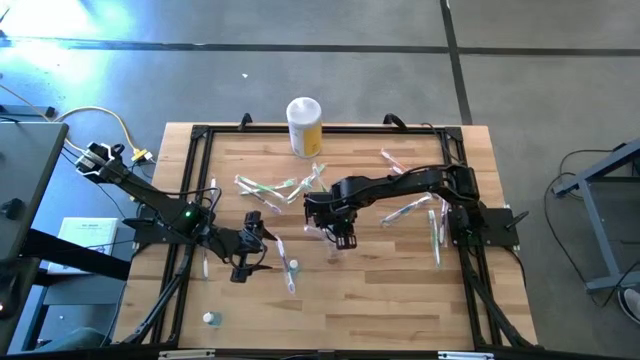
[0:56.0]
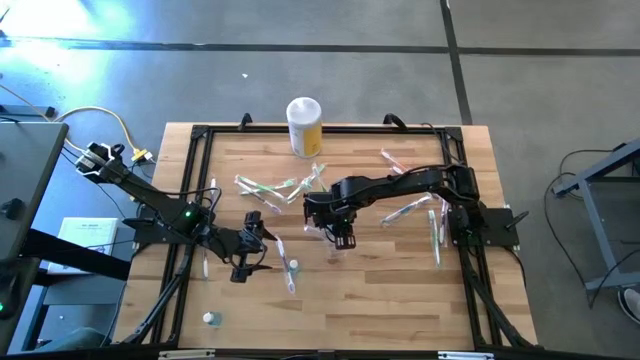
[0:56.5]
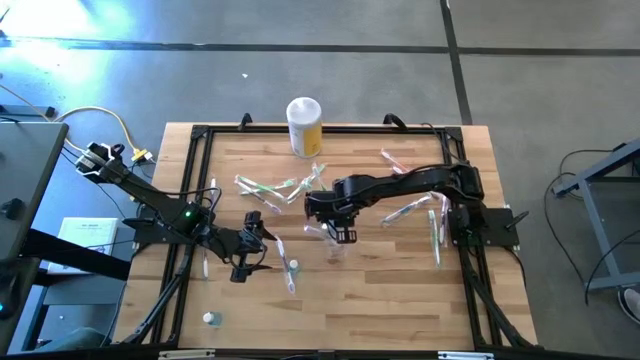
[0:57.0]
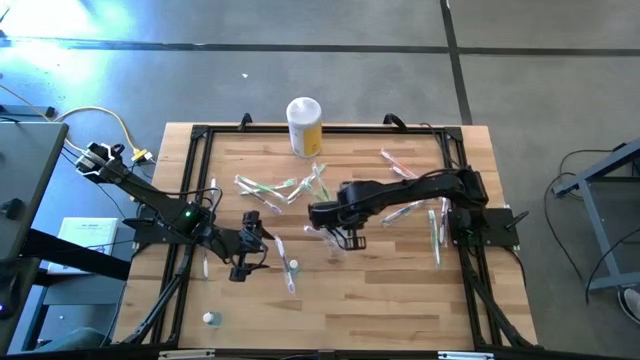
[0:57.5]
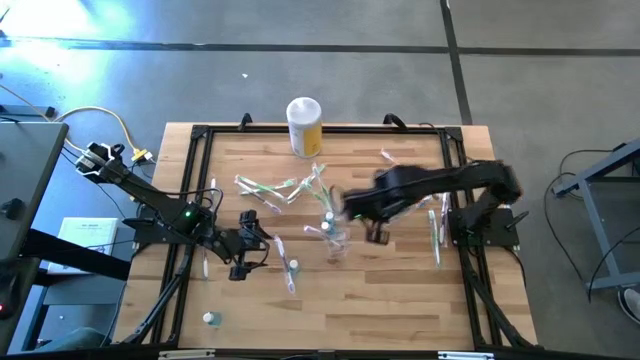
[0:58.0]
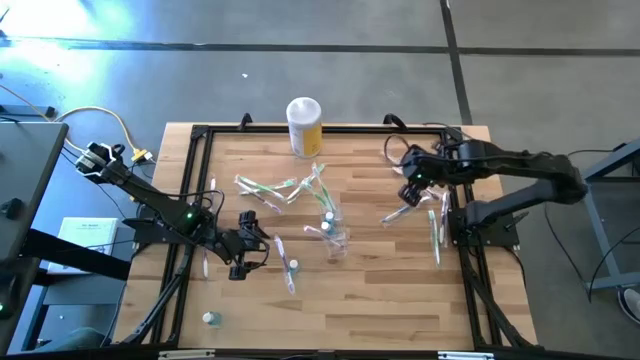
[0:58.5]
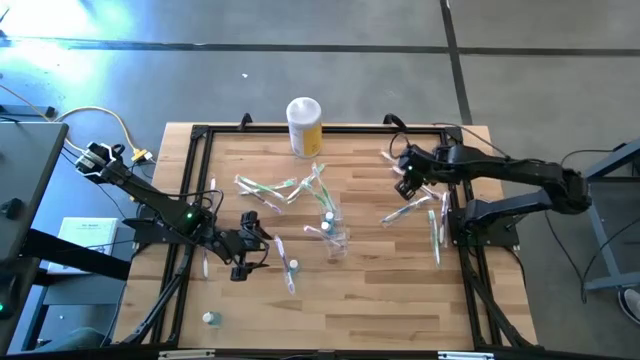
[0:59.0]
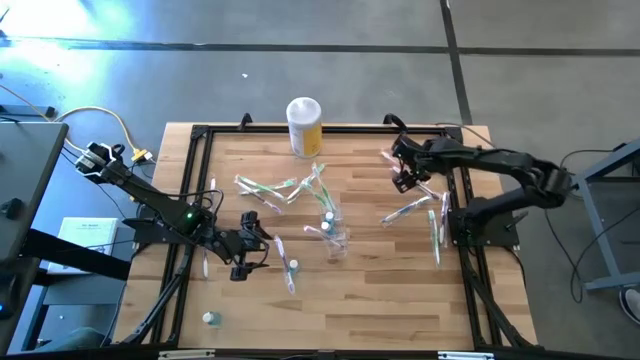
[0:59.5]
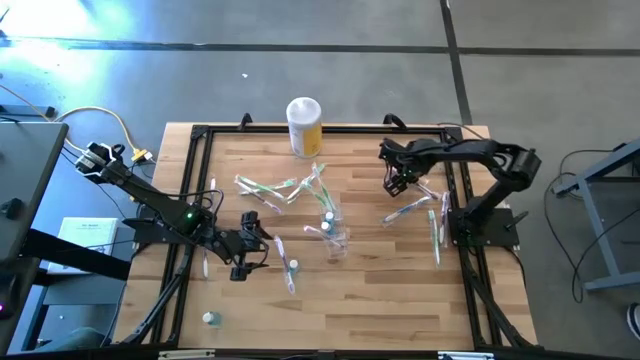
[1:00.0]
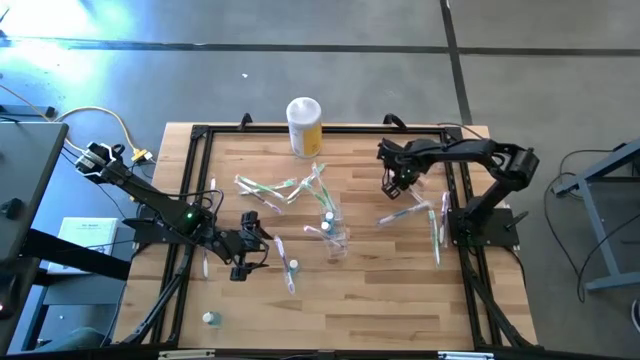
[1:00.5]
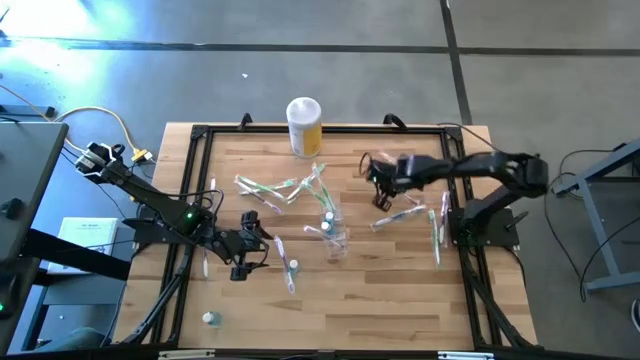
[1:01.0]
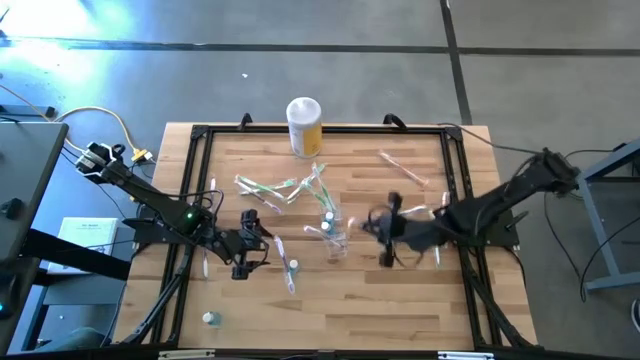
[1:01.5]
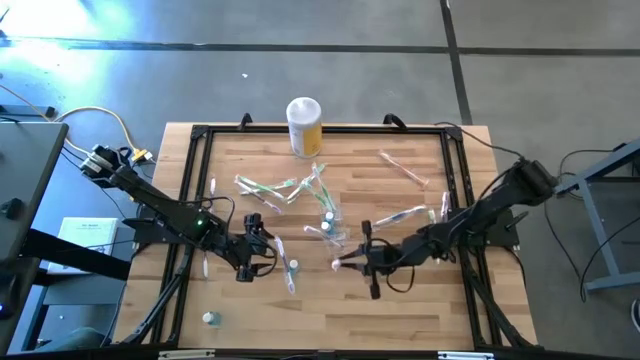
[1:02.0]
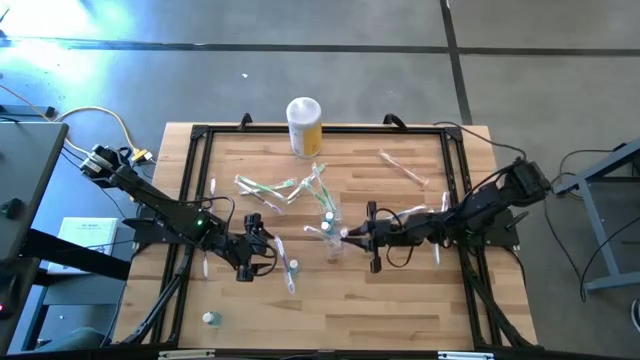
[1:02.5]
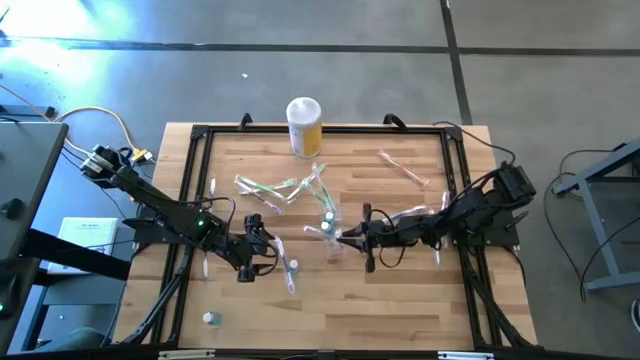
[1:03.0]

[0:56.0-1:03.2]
Task: Pick & Place toothbrushing station
Put the purple toothbrush into the transparent organizer

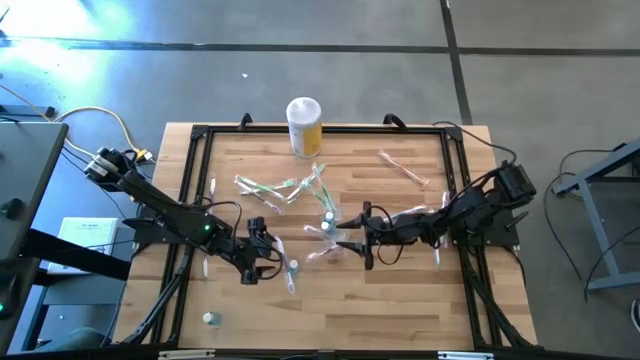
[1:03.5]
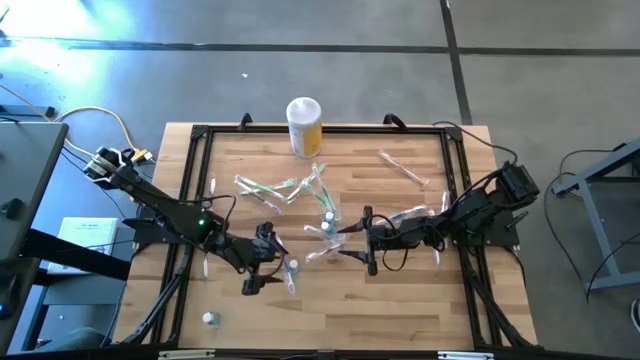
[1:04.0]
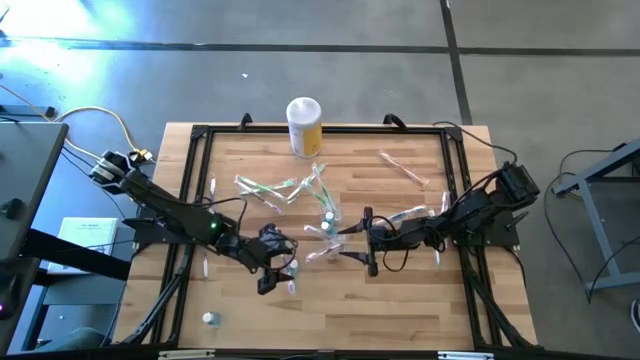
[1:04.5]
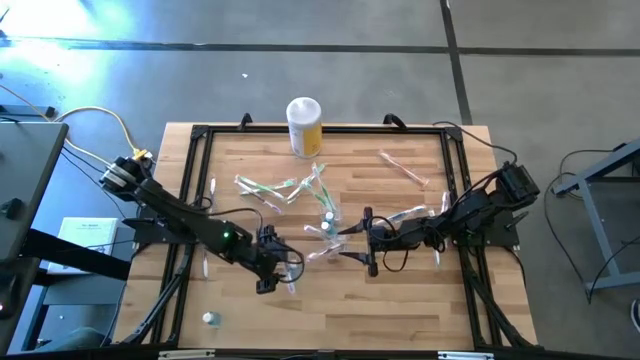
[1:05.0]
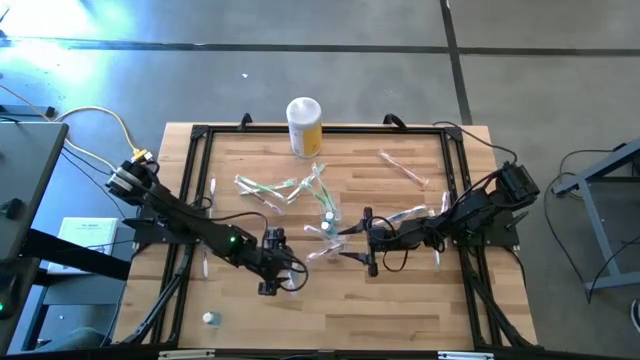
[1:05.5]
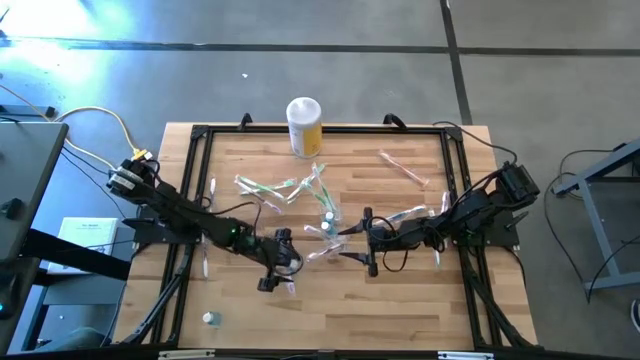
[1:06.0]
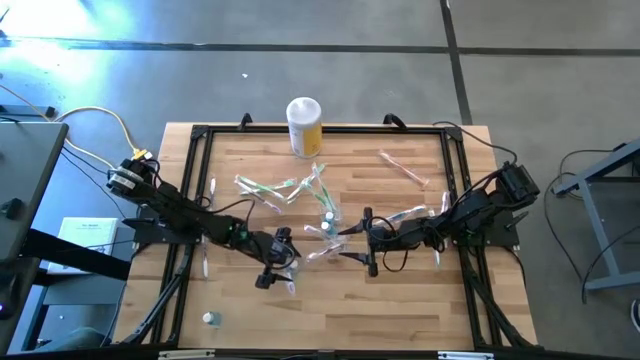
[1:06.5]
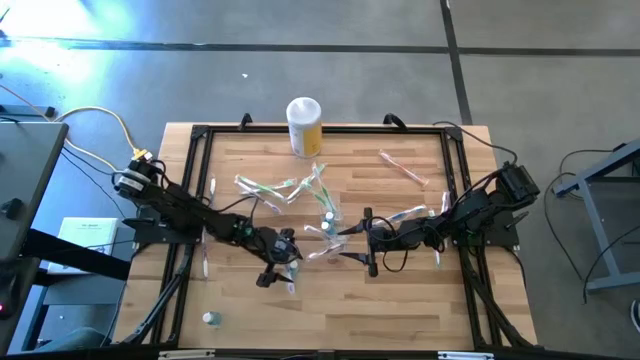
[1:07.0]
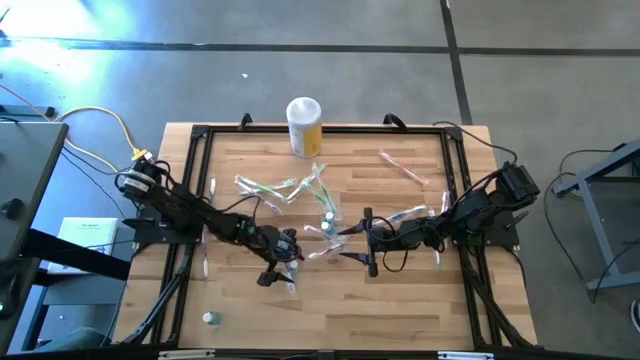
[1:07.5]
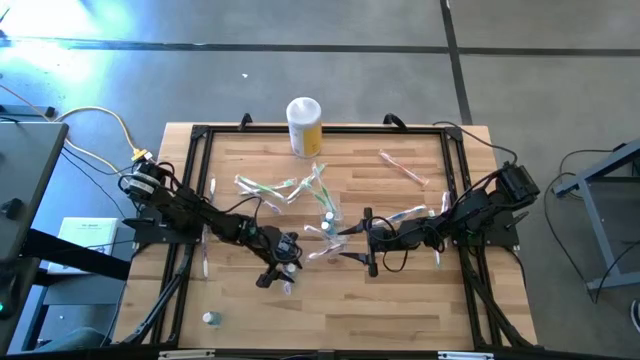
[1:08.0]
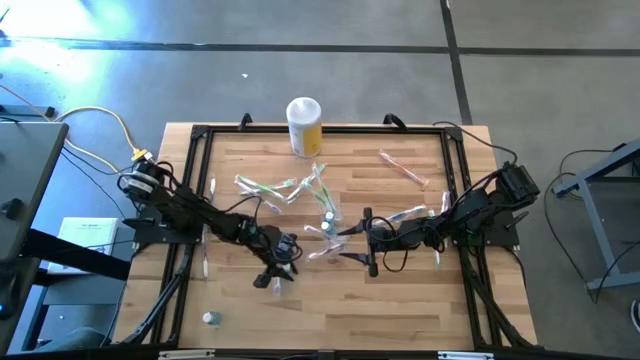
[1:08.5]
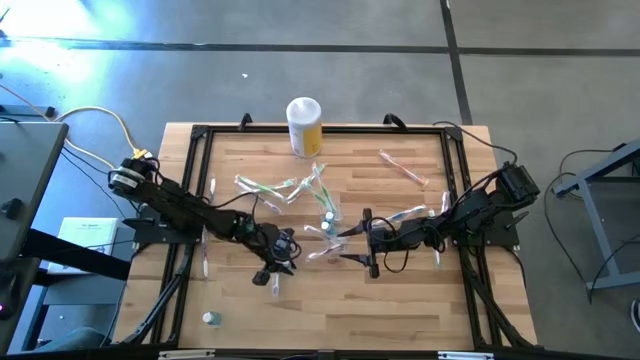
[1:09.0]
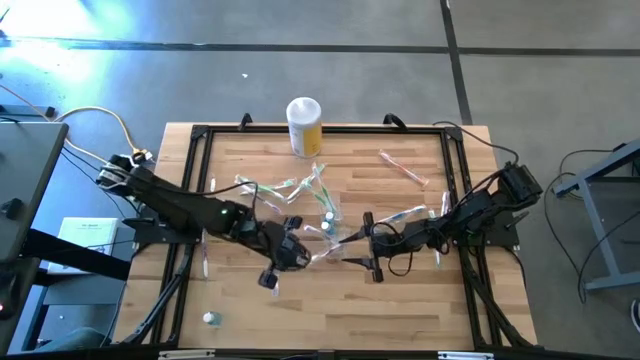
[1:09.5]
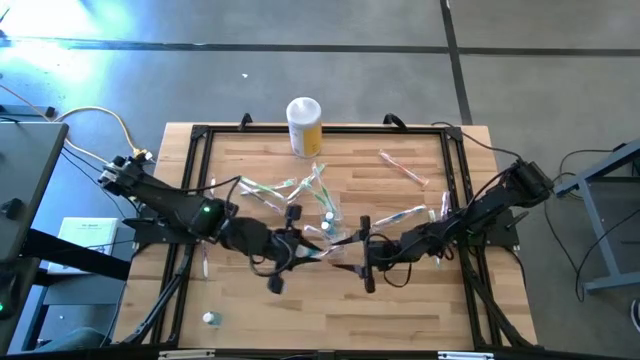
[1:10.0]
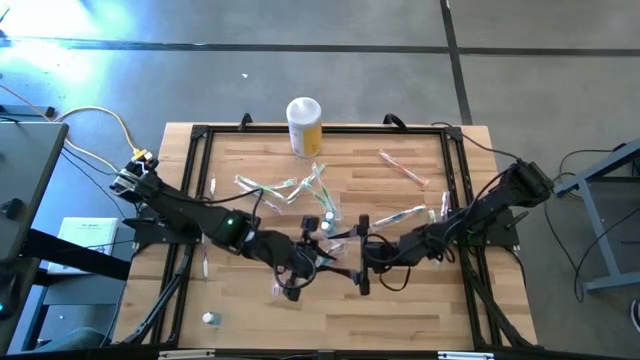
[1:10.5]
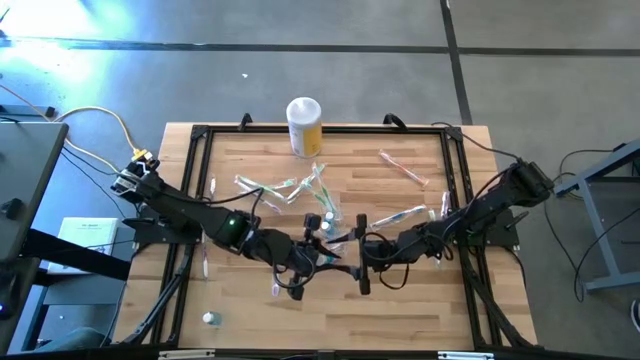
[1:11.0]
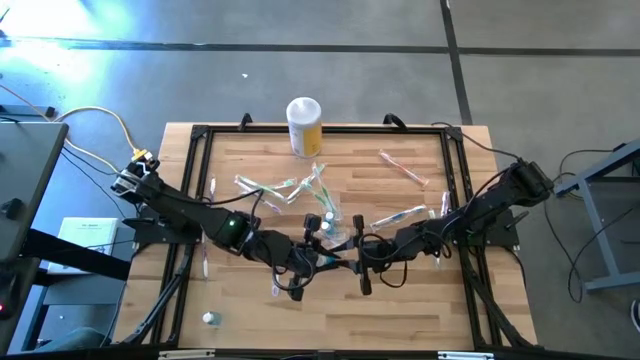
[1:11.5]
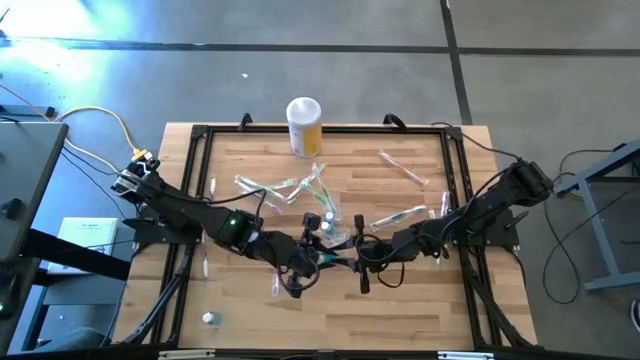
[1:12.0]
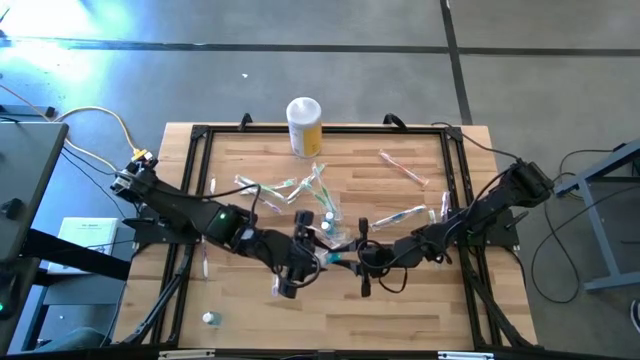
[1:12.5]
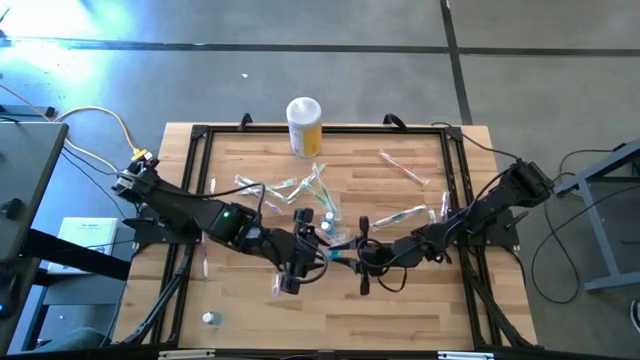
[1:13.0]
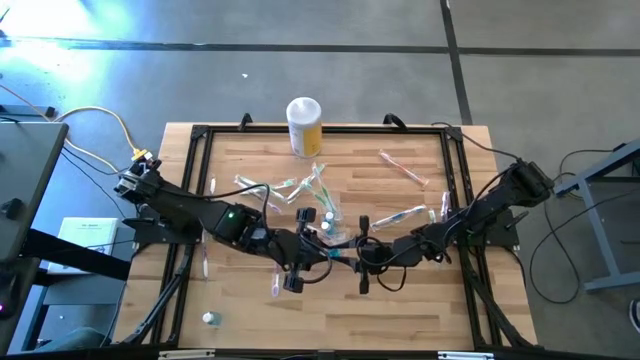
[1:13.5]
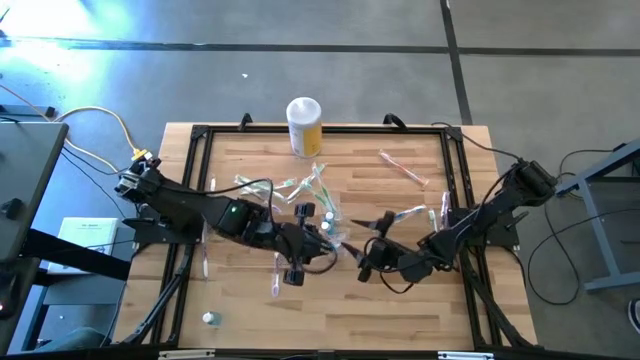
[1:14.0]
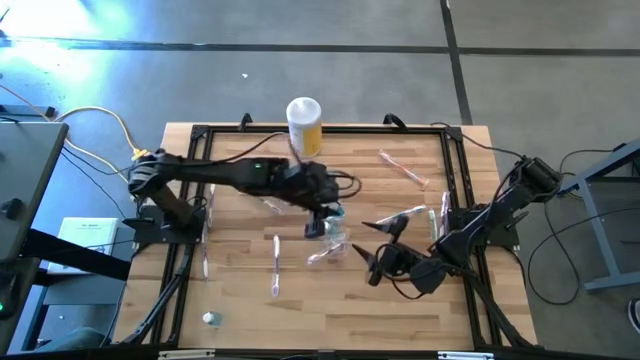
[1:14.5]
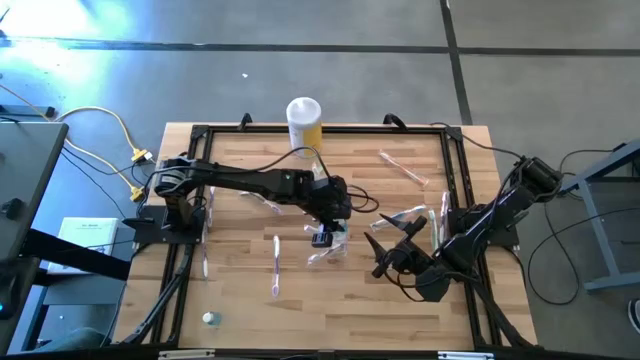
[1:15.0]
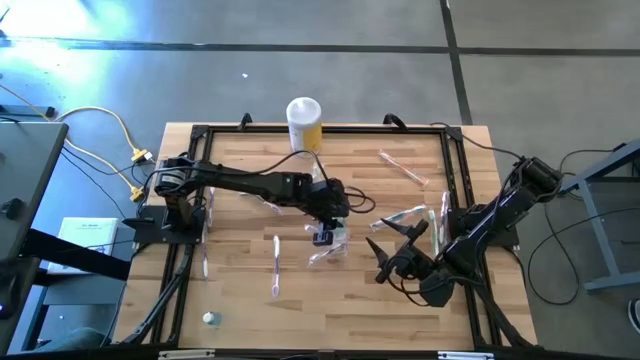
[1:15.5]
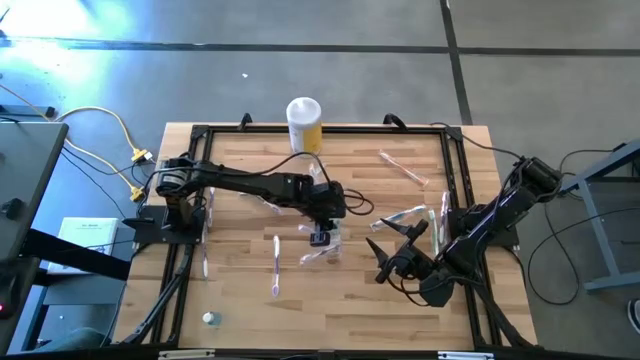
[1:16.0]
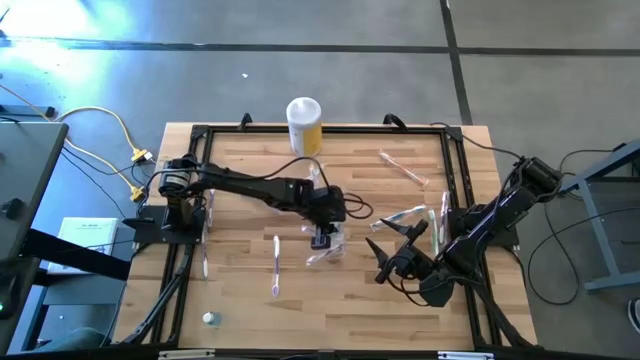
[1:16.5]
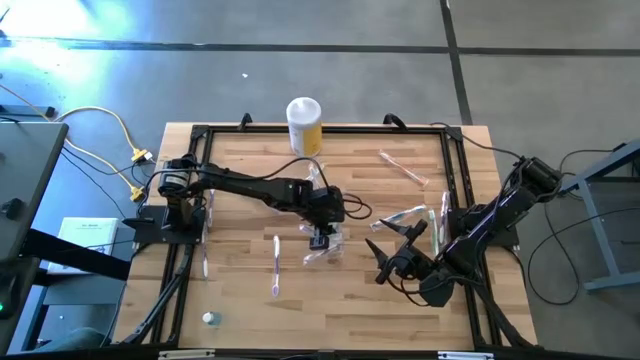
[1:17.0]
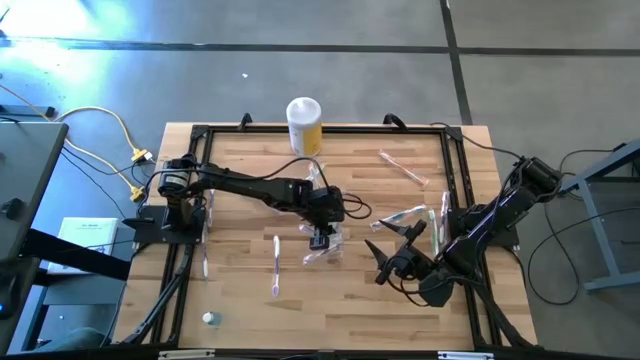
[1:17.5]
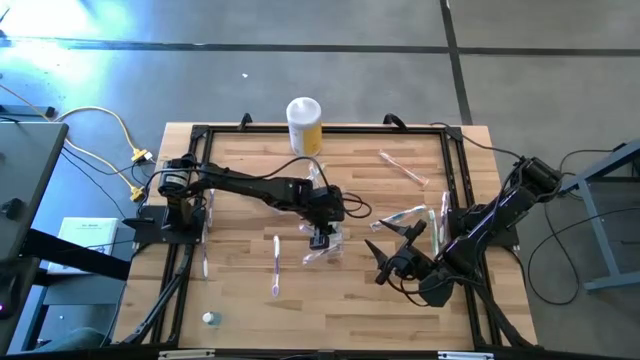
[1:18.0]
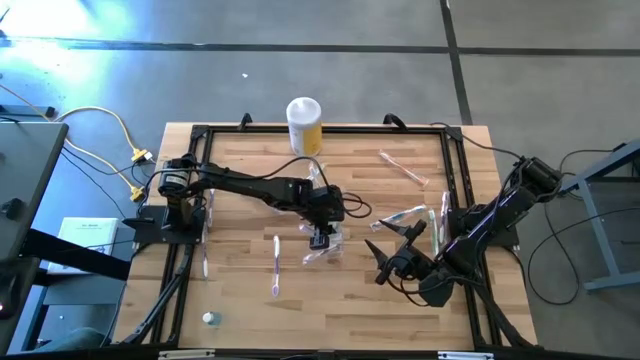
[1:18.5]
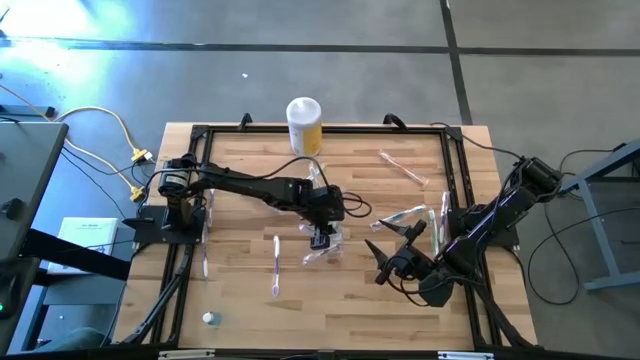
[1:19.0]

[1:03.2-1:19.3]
Put the mouthwash bottle into transparent organizer
